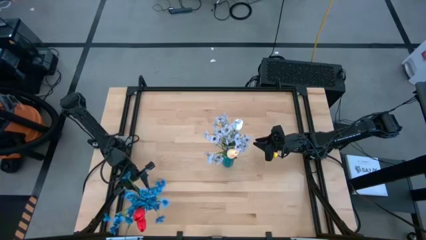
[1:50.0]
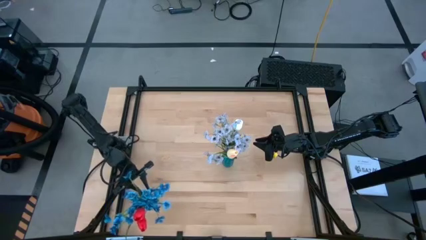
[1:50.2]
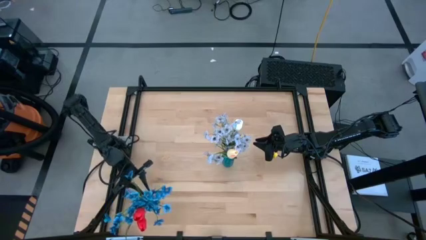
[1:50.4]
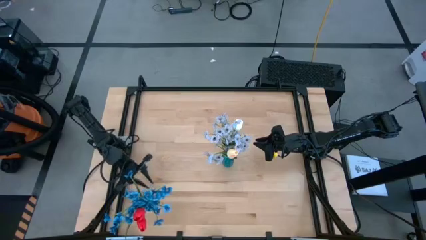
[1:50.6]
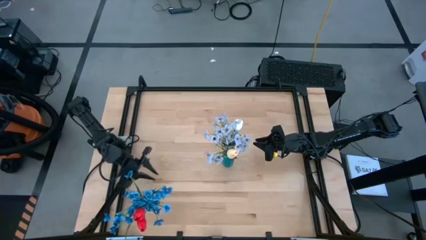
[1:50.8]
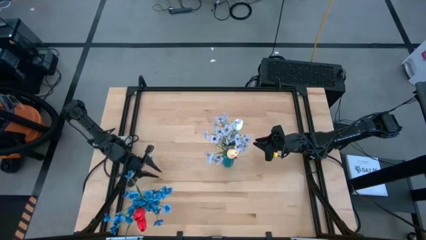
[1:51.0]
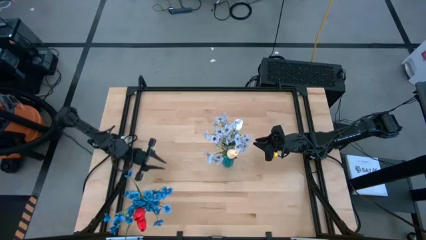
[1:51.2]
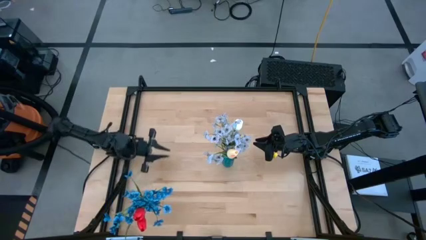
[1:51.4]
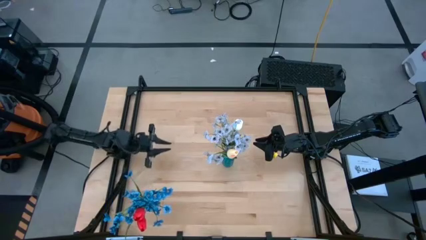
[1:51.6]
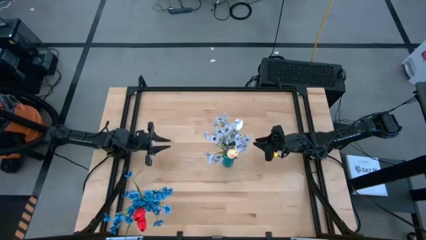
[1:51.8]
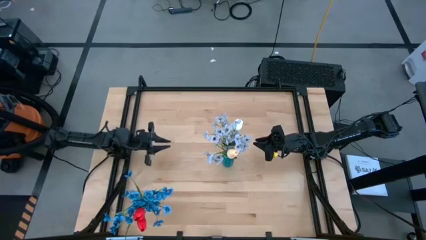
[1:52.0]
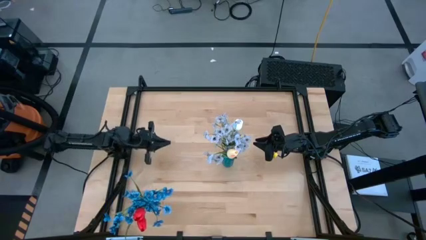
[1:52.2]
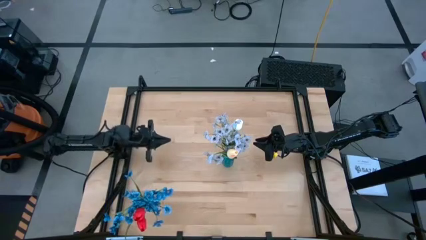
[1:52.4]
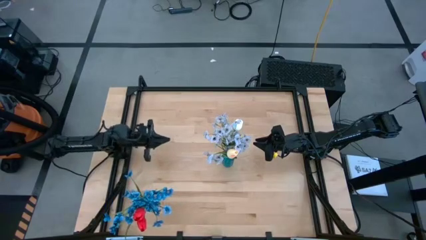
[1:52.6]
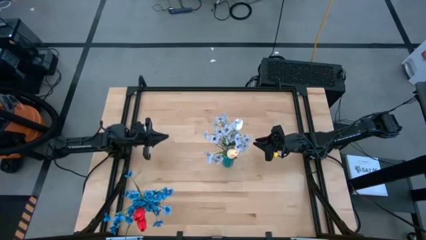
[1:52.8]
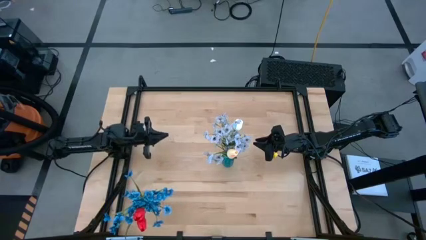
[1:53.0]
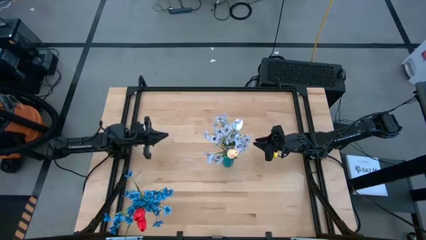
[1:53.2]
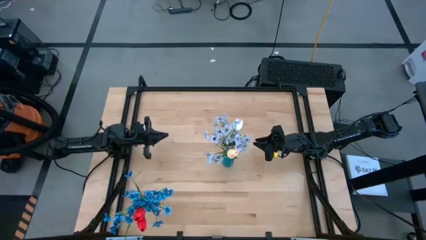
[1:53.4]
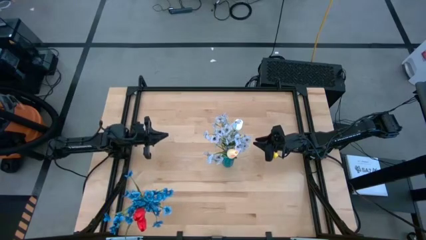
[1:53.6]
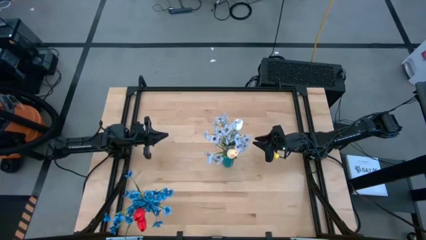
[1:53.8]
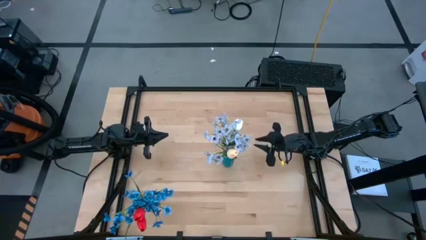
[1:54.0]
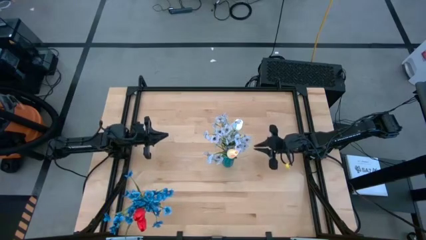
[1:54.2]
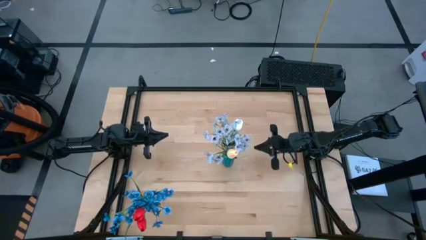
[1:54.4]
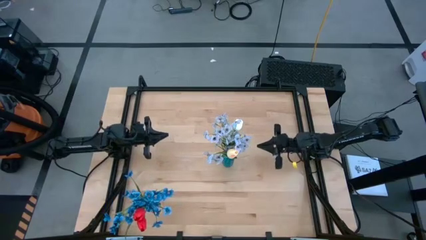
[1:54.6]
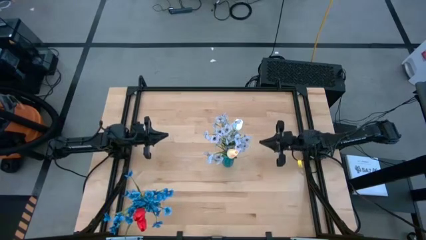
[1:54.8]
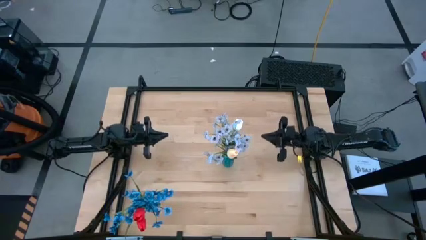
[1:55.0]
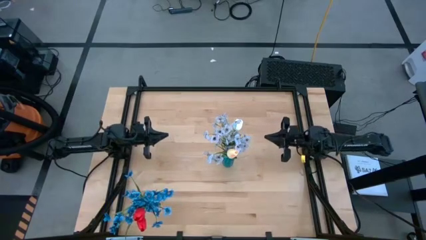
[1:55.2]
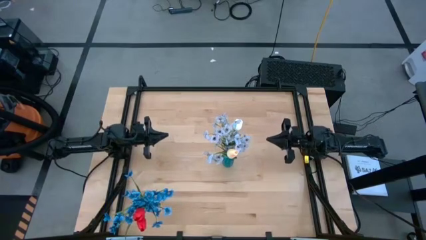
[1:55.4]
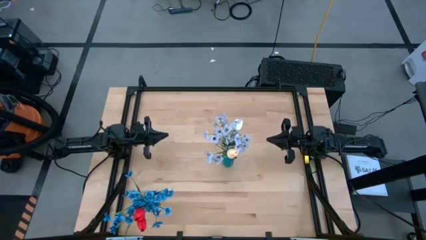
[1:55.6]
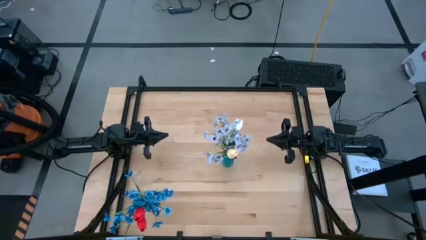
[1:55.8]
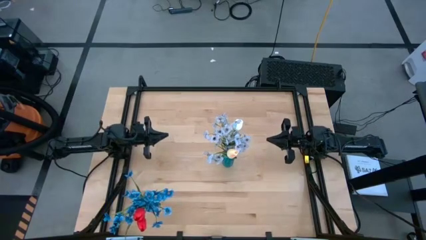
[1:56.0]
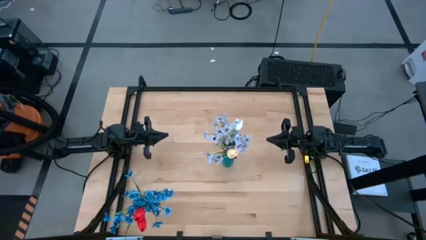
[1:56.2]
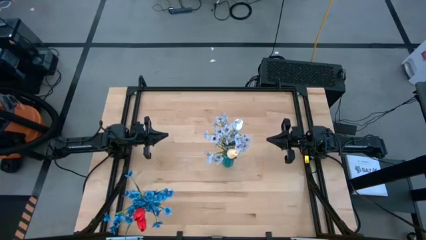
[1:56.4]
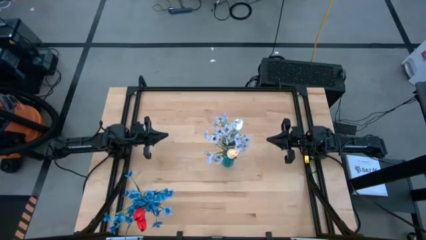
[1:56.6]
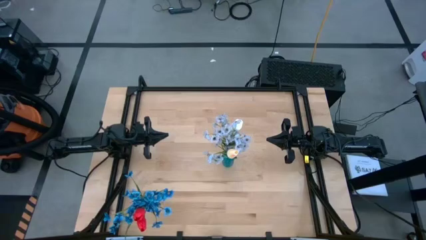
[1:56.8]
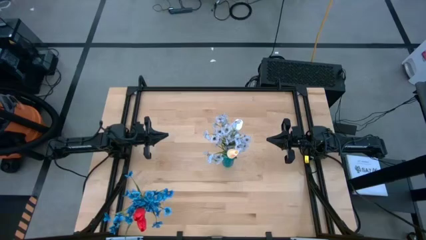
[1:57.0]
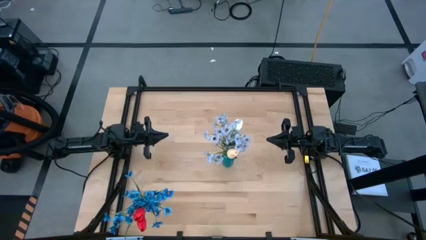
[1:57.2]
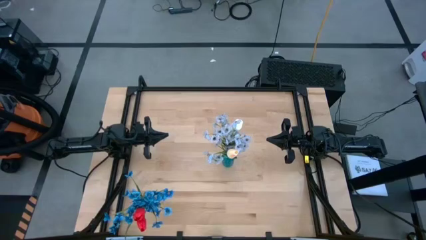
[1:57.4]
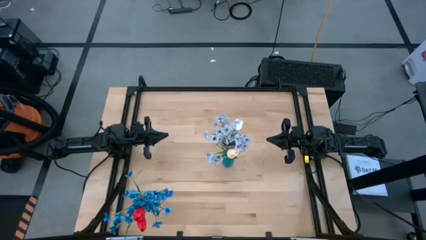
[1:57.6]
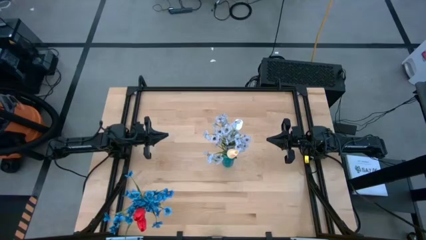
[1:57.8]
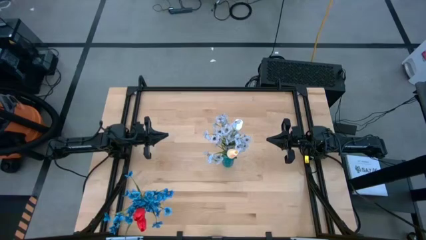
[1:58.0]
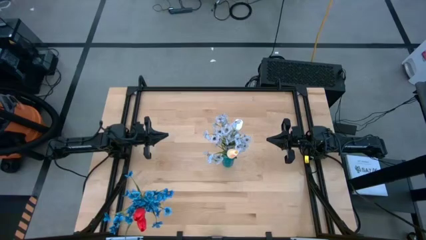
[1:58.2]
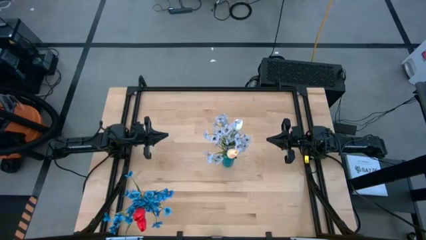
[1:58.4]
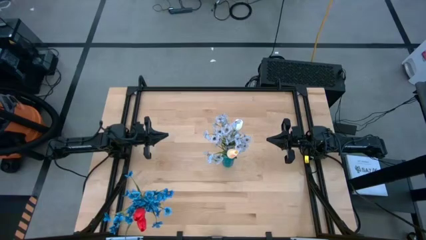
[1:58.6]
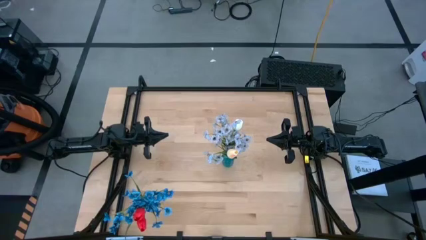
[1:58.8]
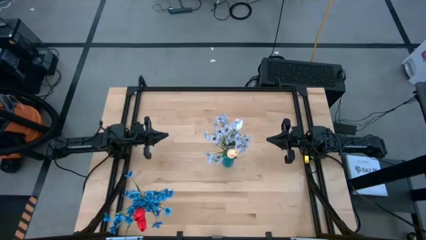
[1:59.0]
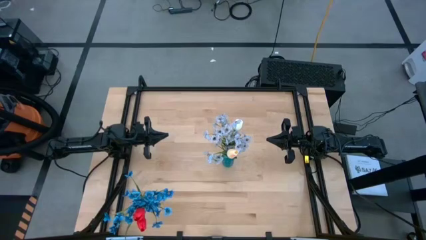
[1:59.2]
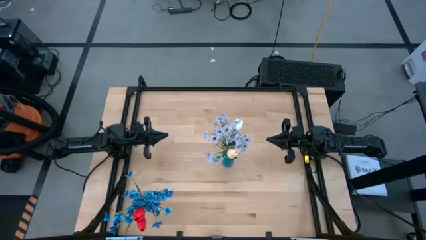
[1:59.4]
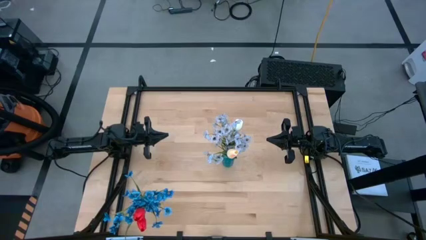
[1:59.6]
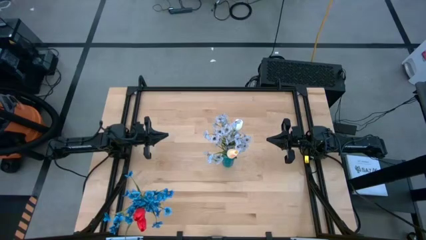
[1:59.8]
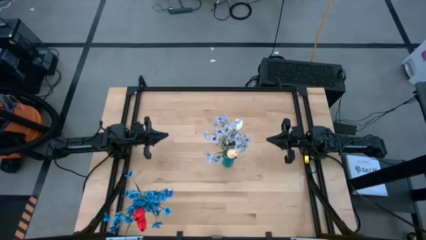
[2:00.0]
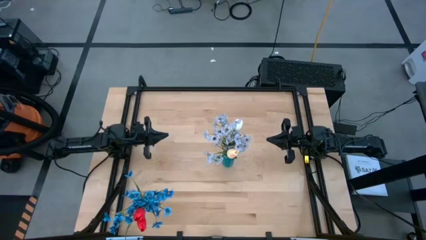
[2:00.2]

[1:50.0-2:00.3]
Task: Sort flowers into vase by color
Return to Home Position

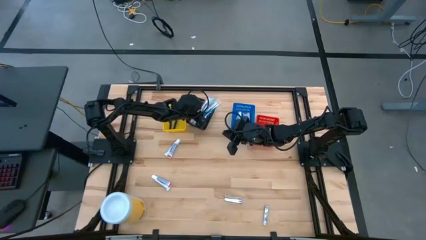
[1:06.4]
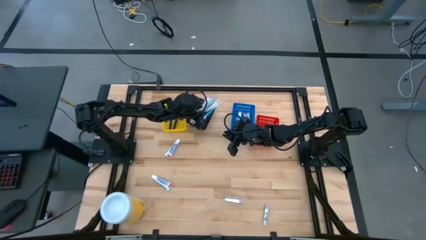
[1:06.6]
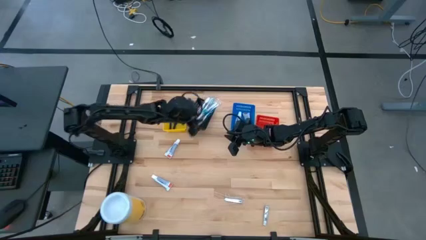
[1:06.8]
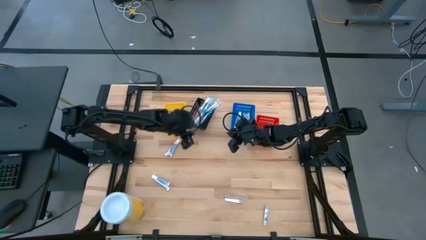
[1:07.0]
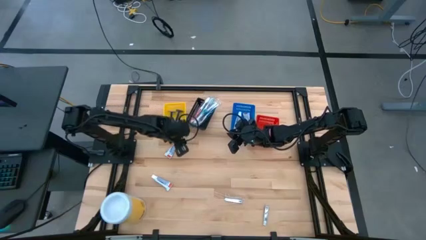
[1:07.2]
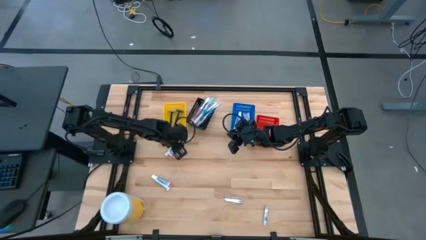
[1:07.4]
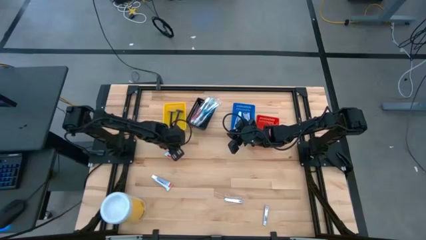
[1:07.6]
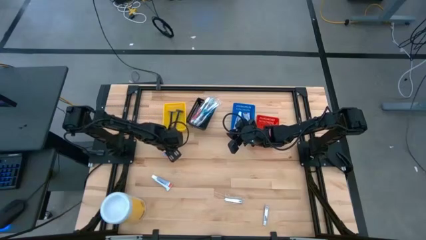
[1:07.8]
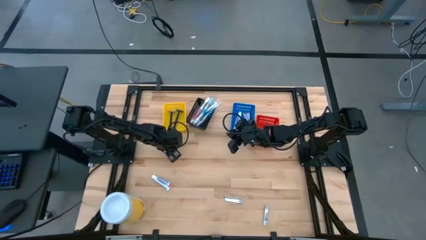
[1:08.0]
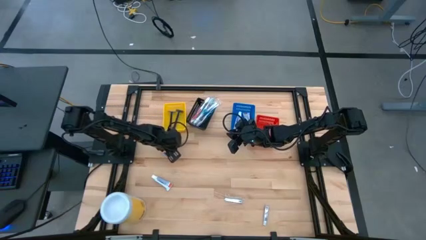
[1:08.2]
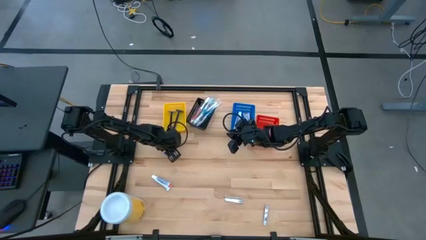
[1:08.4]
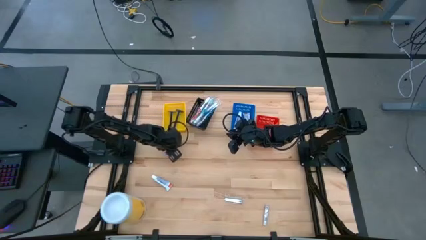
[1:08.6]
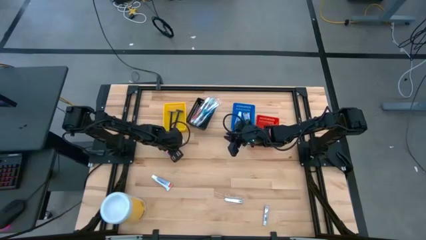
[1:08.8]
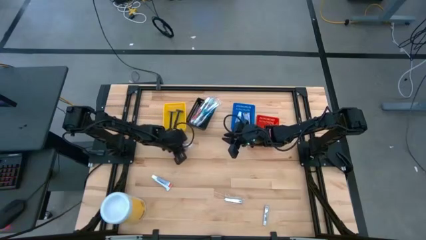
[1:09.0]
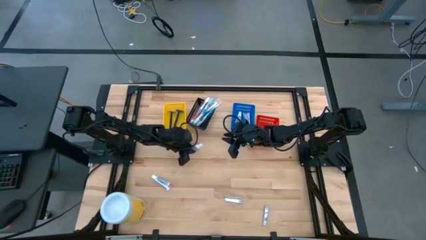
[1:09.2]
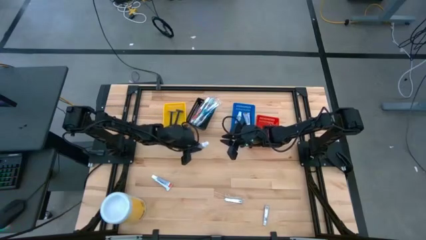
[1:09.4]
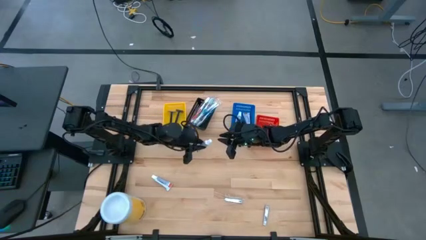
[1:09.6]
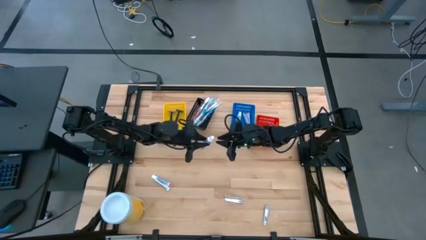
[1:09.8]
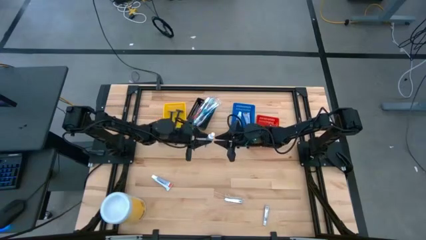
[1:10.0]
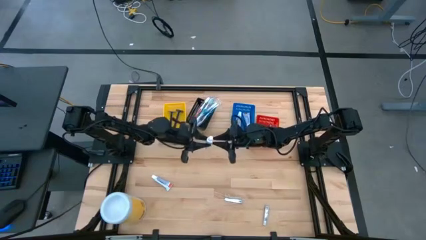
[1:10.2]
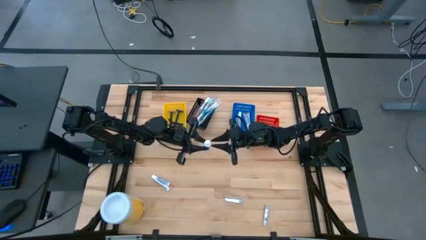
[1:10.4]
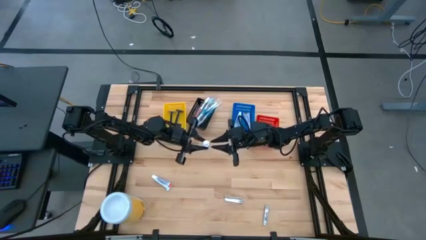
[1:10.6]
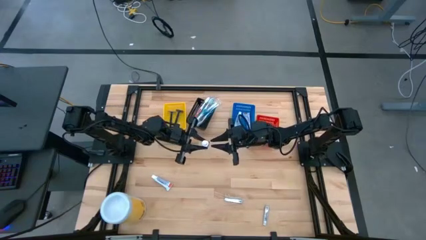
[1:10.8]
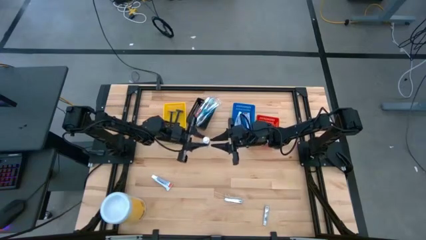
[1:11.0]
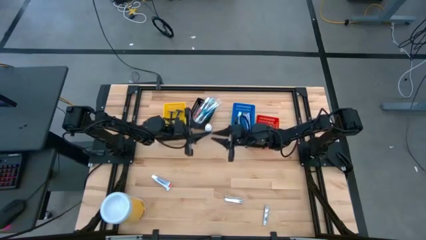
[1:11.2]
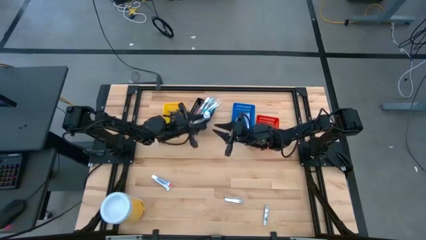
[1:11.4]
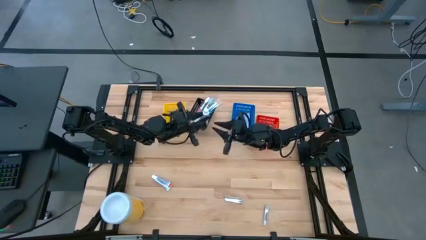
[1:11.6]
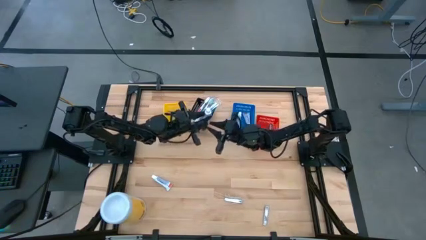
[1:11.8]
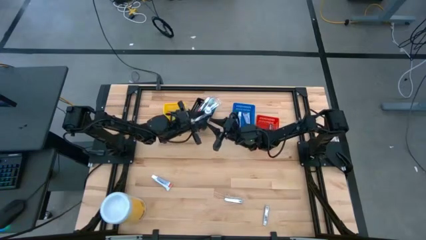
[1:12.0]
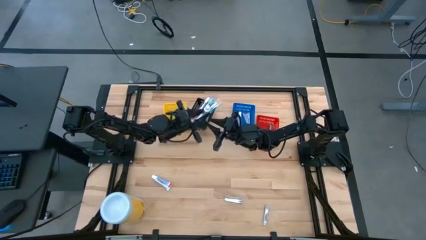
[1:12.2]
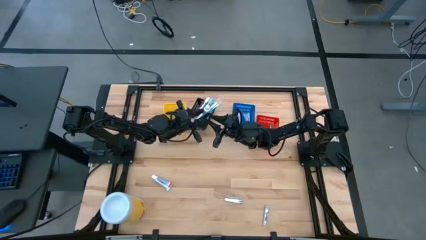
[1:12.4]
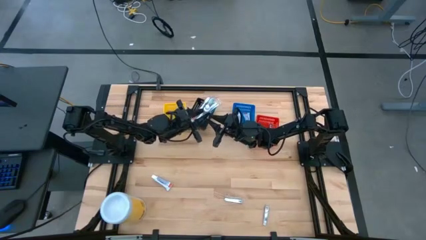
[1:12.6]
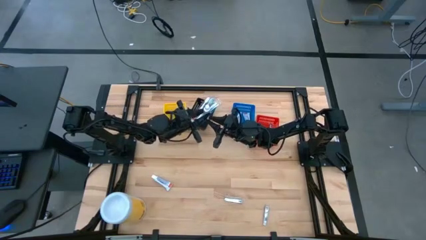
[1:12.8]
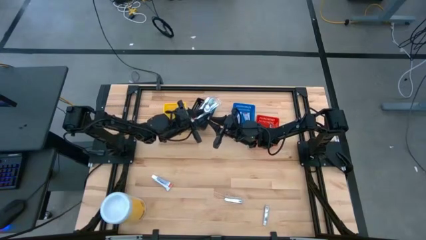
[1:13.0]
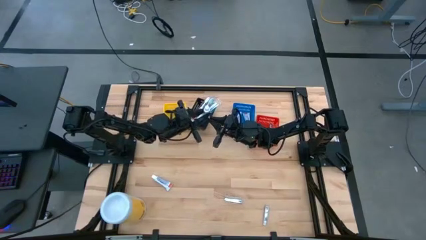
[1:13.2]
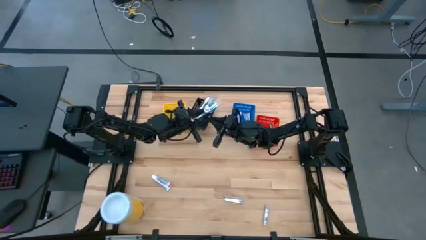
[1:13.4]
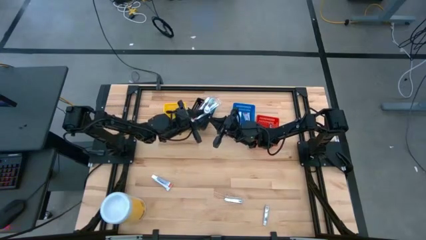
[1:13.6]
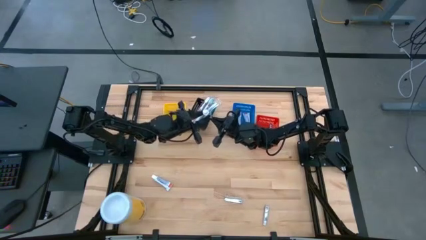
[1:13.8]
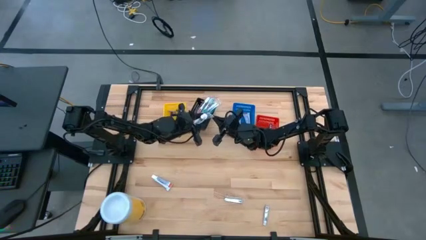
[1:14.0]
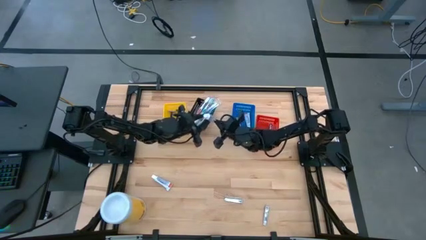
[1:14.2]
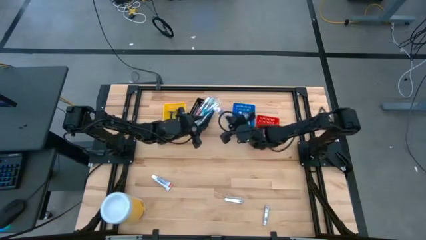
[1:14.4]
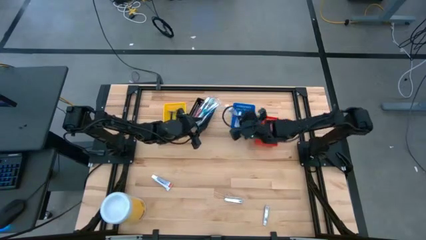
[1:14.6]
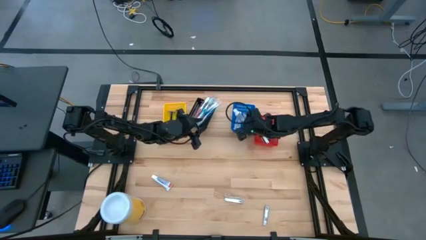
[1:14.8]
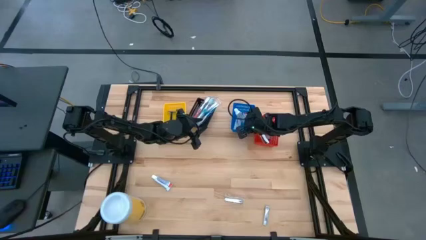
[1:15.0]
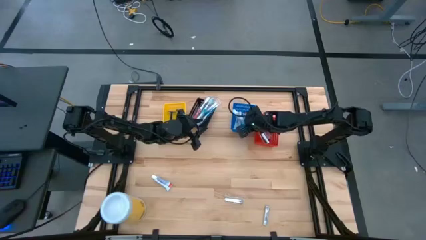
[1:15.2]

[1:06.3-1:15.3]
Task: Pick & Place Travel size toiletries
Put the blue toothpaste into the blue bin
